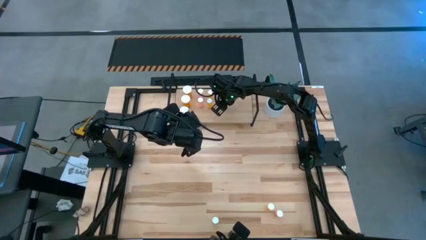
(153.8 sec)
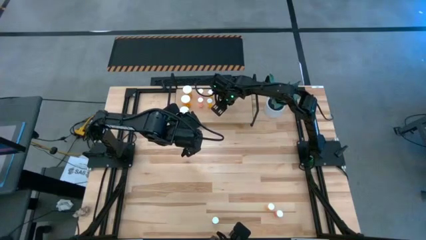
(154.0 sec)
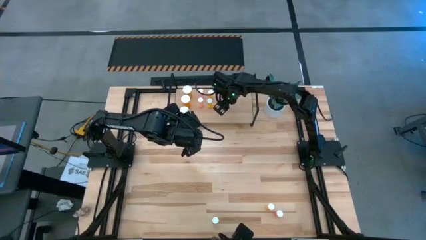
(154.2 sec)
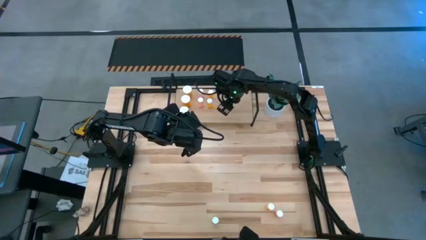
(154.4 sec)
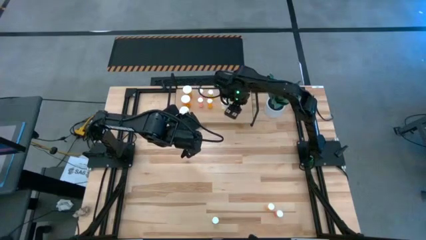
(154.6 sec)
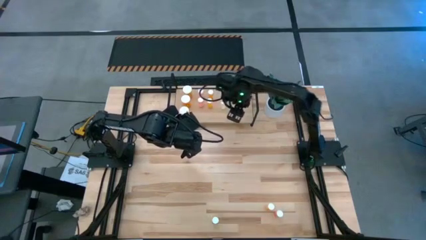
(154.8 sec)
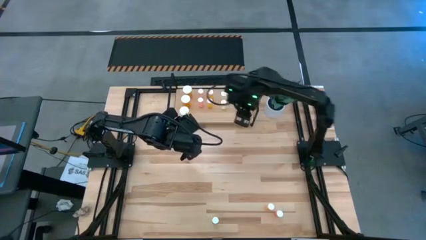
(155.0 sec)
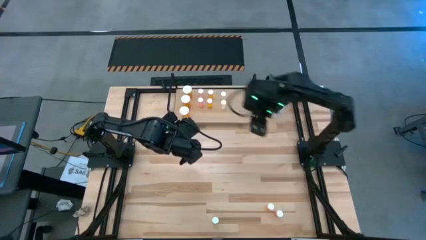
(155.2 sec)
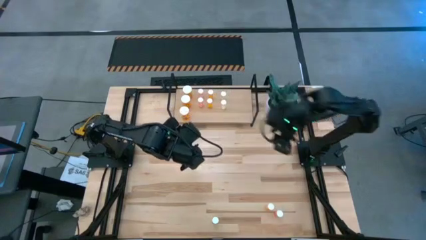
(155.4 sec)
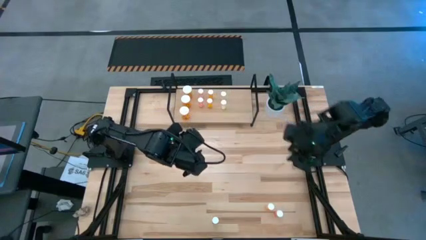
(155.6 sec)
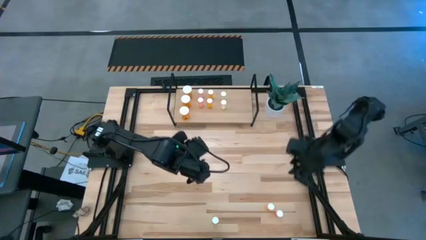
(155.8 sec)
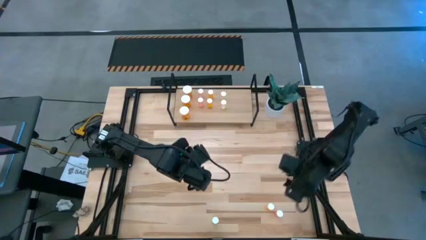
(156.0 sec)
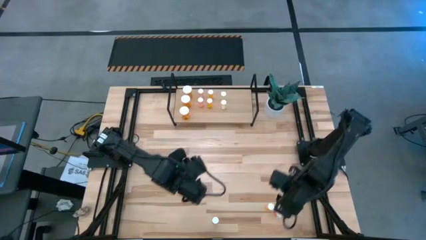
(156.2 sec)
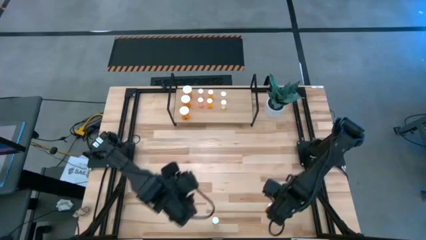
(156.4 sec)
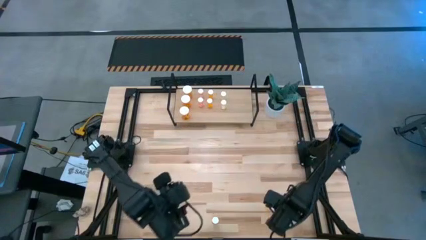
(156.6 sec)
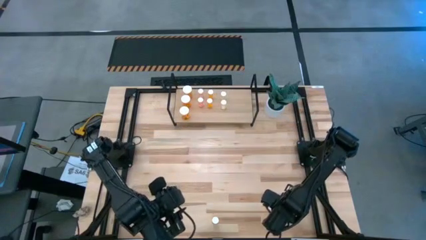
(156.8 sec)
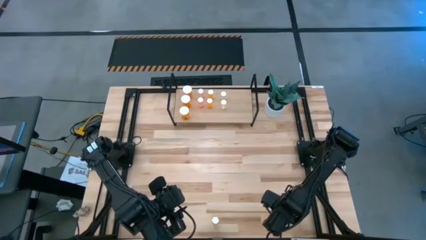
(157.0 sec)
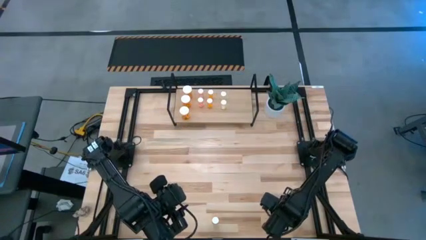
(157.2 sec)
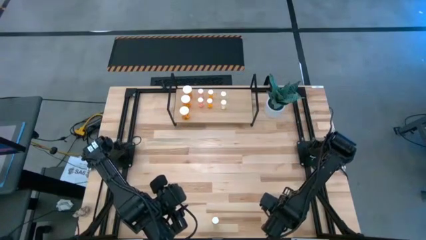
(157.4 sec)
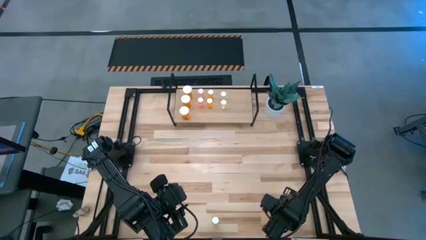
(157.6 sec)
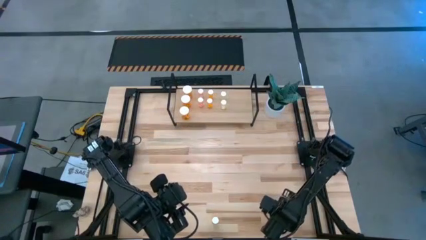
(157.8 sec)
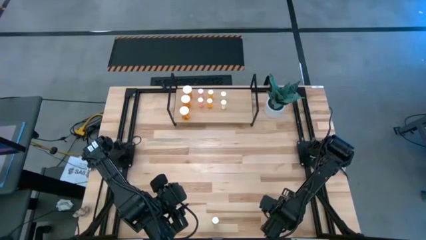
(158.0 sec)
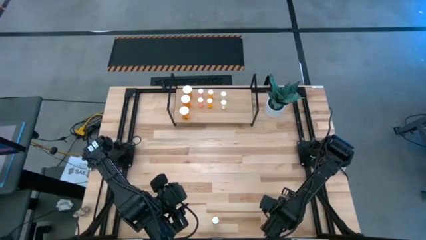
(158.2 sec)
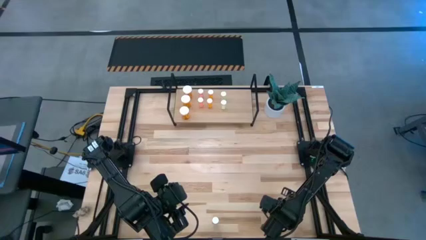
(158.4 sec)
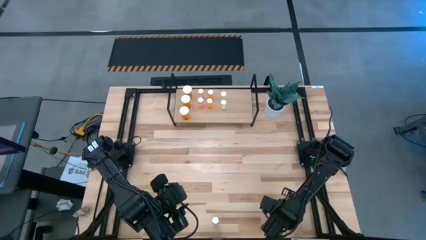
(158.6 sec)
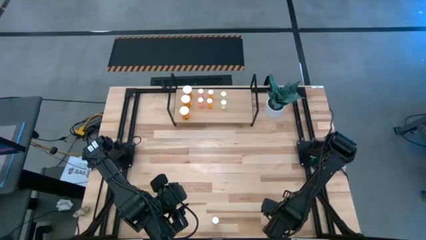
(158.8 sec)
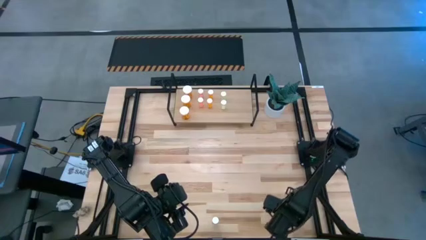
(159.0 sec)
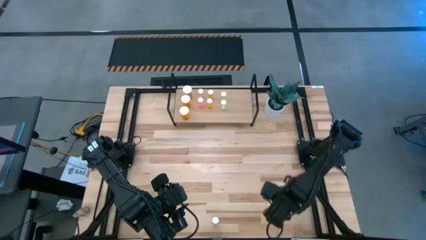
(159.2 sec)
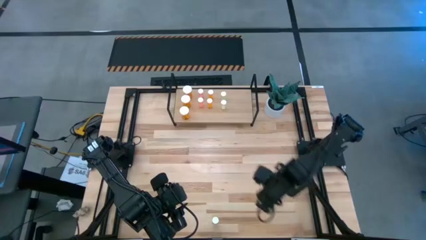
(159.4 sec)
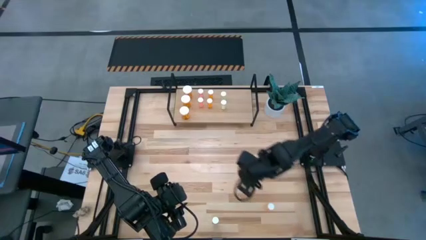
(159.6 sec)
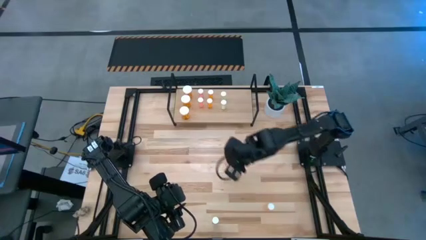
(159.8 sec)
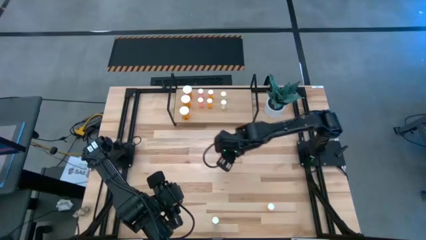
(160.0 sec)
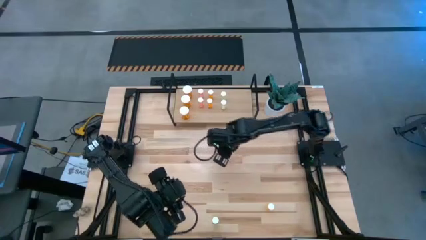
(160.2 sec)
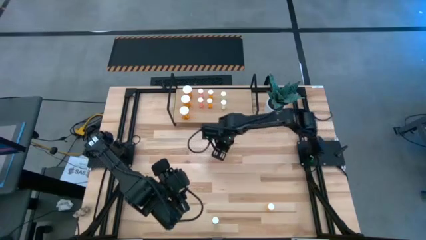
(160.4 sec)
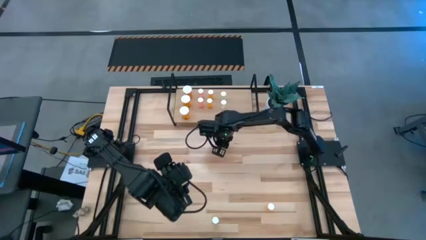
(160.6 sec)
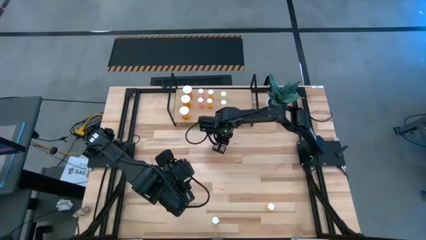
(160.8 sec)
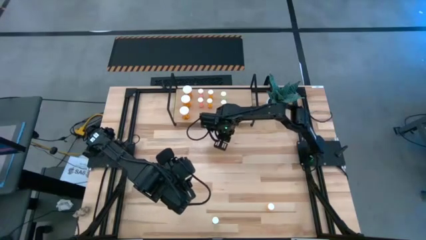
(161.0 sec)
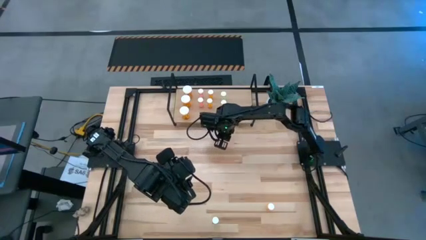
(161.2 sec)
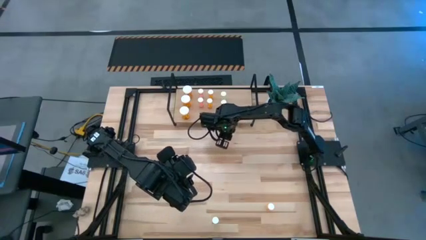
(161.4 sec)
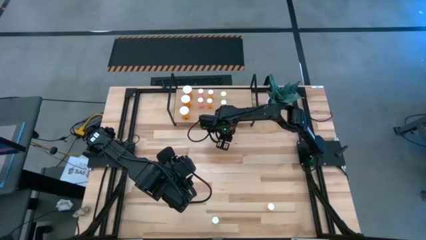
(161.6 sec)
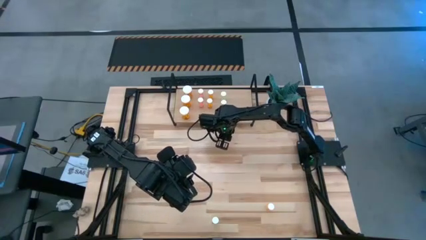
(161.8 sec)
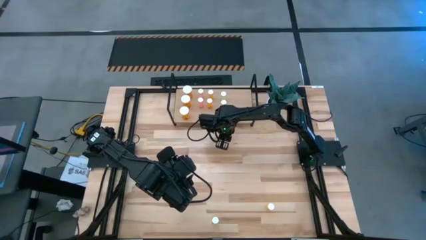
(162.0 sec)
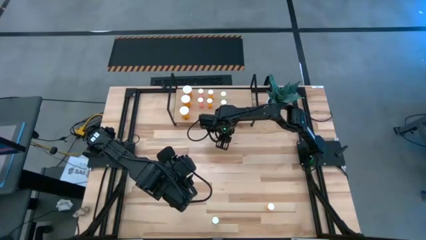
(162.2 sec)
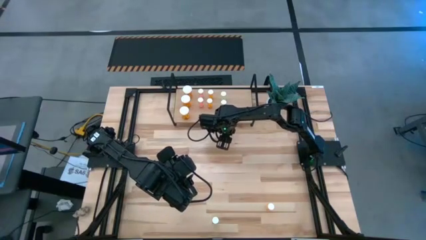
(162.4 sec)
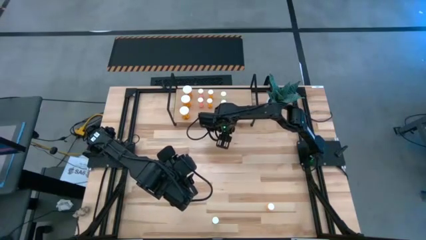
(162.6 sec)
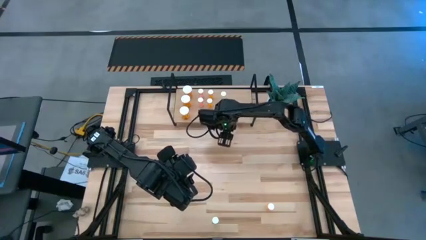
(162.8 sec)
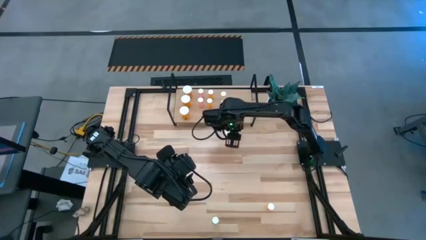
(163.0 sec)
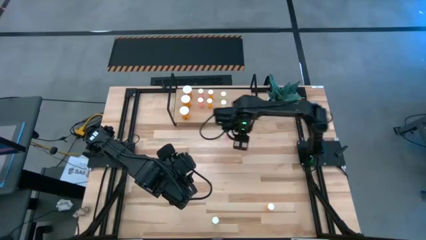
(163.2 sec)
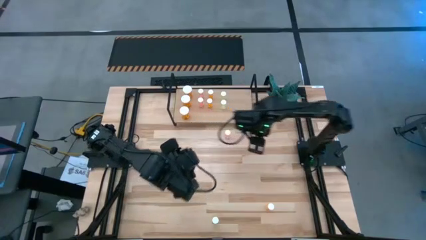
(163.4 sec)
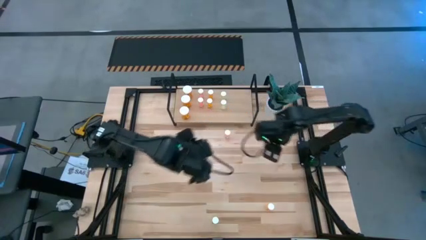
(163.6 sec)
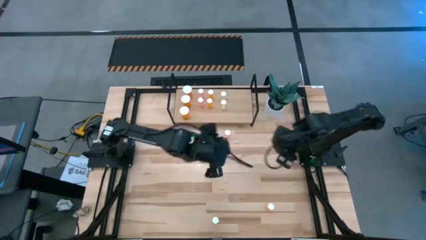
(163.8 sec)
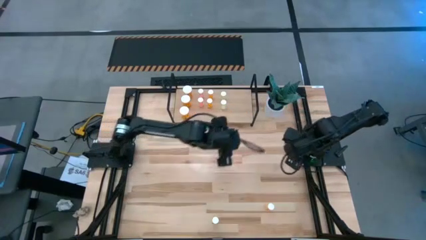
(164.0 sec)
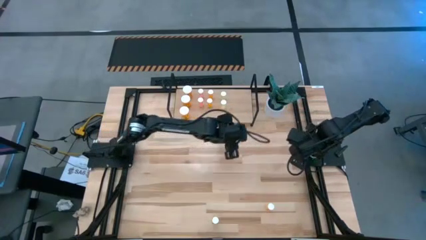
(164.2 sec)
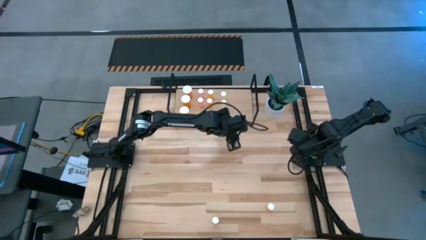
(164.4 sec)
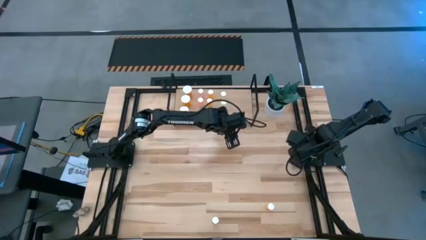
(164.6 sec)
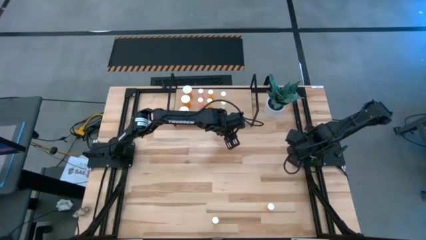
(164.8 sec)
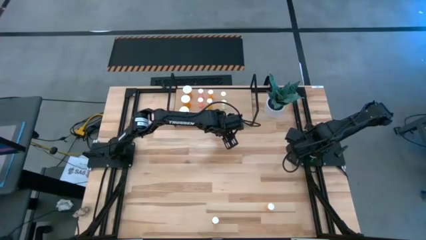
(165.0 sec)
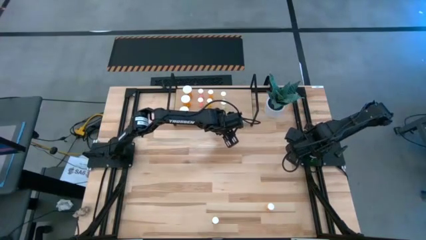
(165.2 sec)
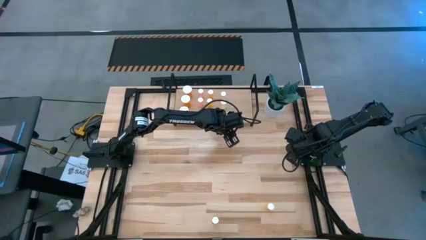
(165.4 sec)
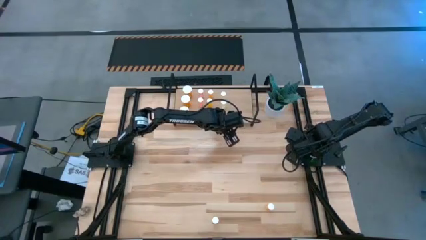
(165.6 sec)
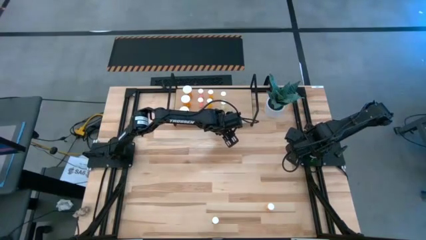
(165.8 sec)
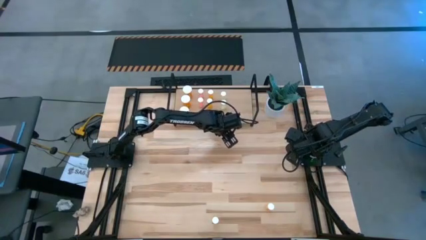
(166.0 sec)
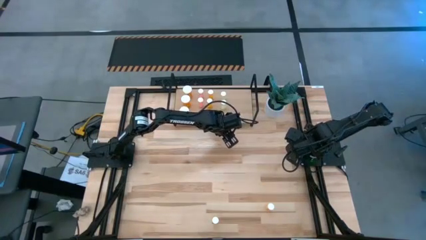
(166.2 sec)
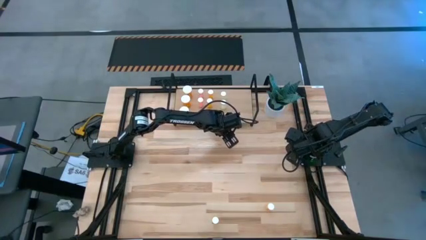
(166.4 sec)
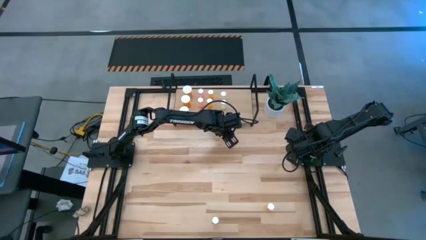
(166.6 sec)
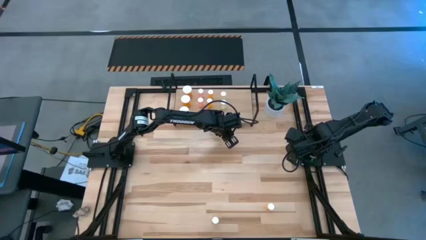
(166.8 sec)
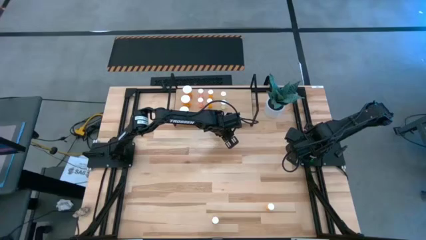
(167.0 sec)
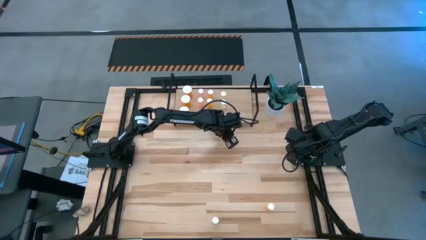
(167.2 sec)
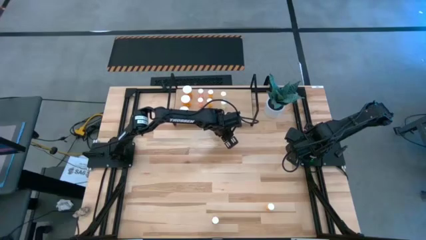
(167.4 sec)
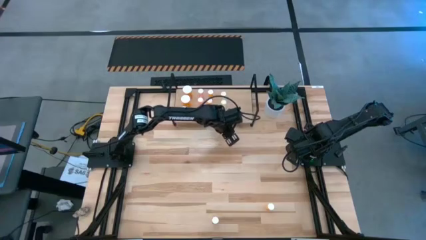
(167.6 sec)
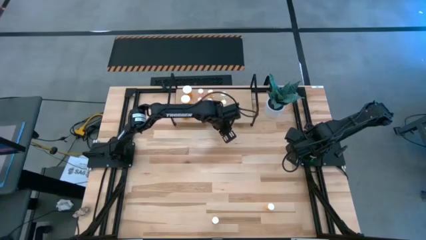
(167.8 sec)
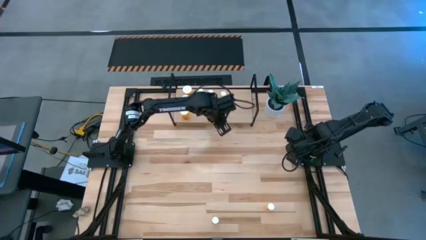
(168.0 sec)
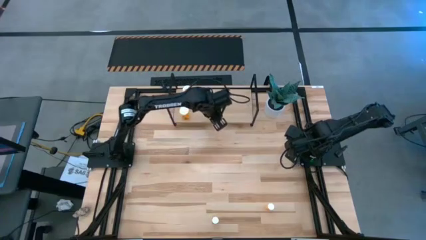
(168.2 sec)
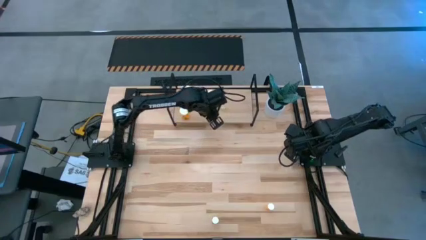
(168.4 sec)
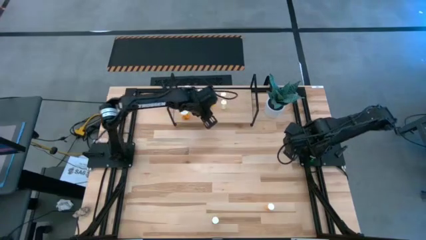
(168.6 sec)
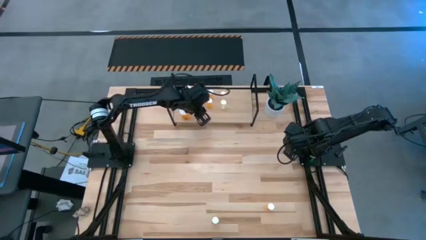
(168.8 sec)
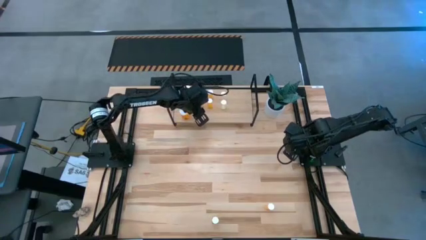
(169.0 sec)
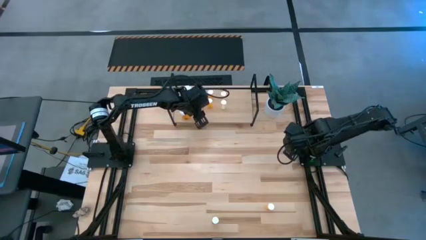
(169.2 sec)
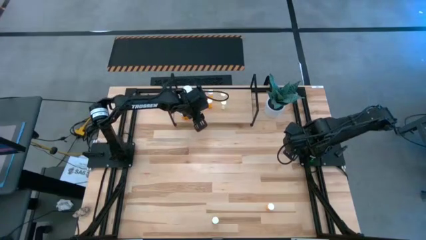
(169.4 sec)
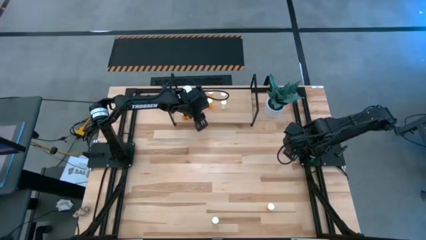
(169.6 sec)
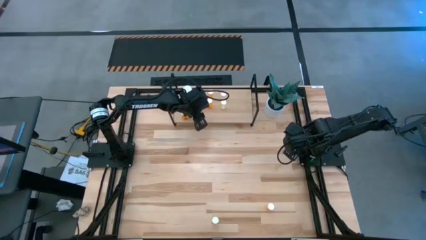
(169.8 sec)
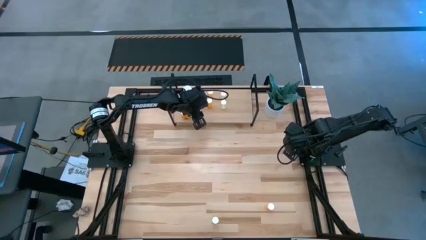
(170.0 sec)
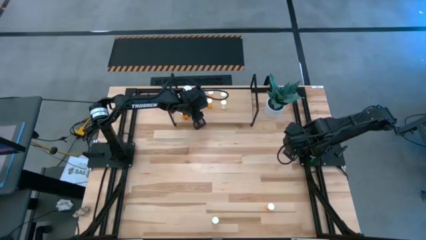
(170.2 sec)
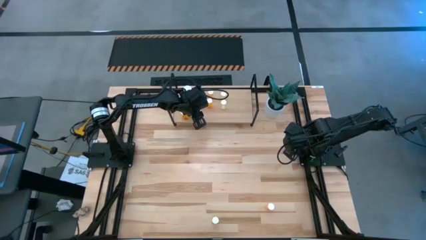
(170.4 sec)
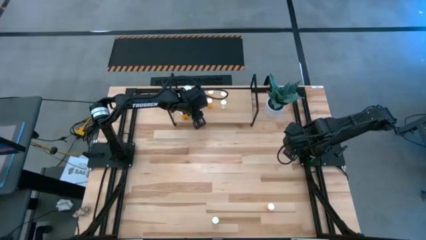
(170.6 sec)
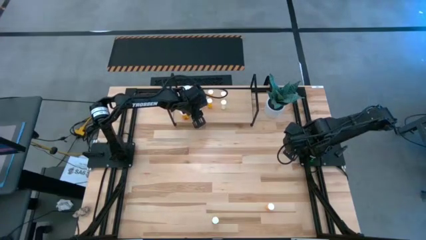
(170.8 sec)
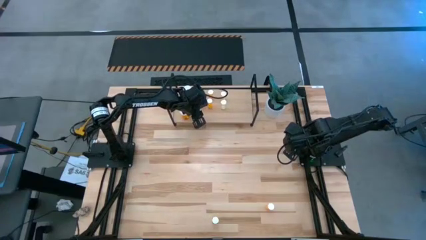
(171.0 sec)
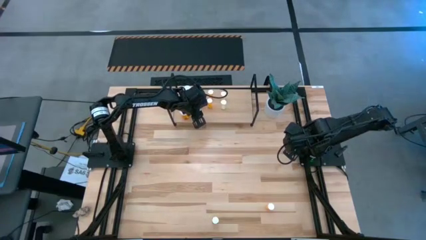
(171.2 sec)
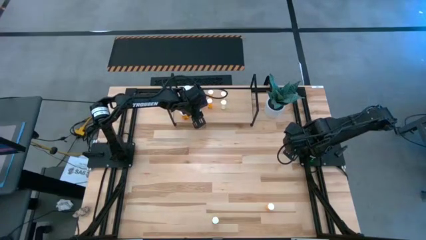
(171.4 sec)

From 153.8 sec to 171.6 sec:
Task: Pick and place medicine bottles onto shelf by color
Put the red pill bottle on the shelf aligned with the other red pill bottles
